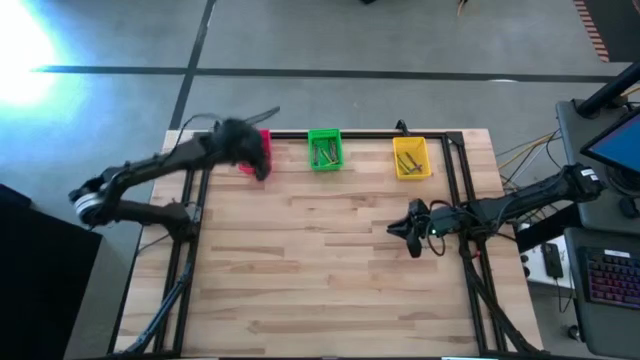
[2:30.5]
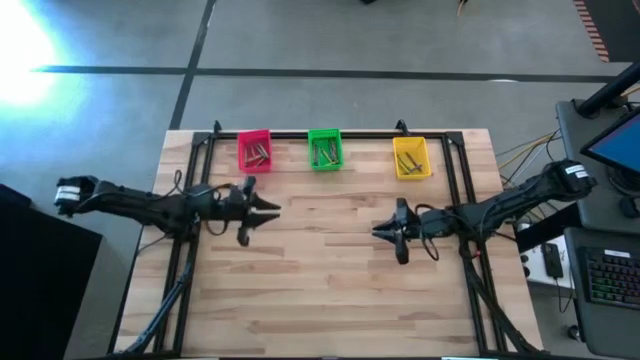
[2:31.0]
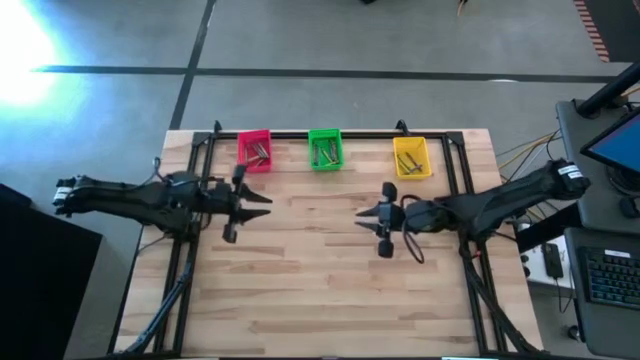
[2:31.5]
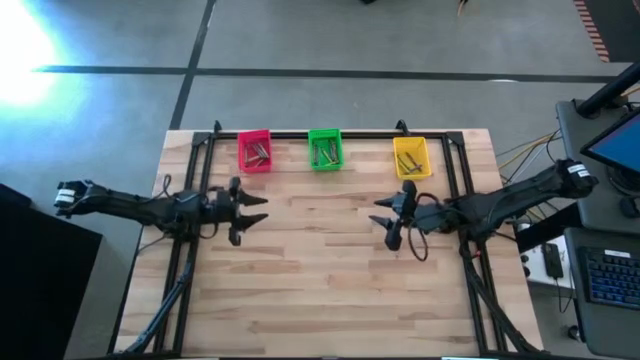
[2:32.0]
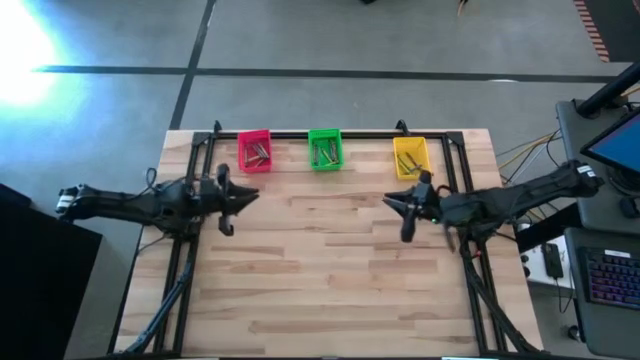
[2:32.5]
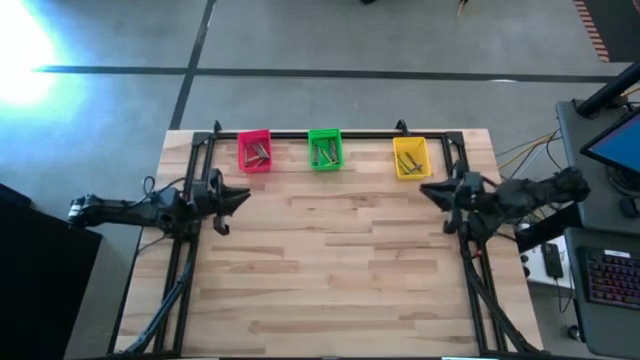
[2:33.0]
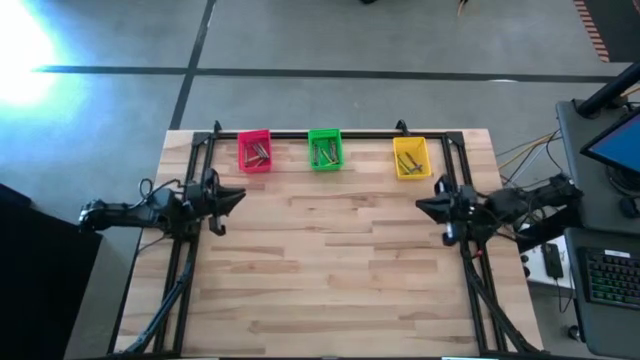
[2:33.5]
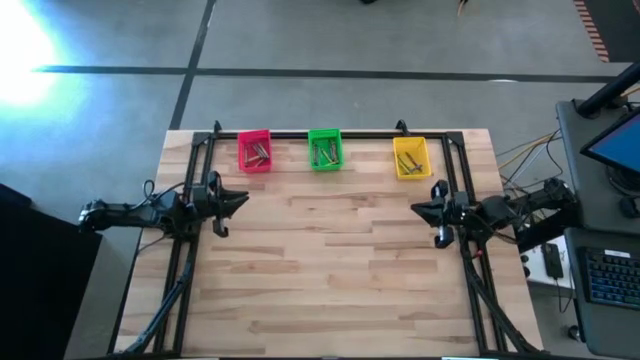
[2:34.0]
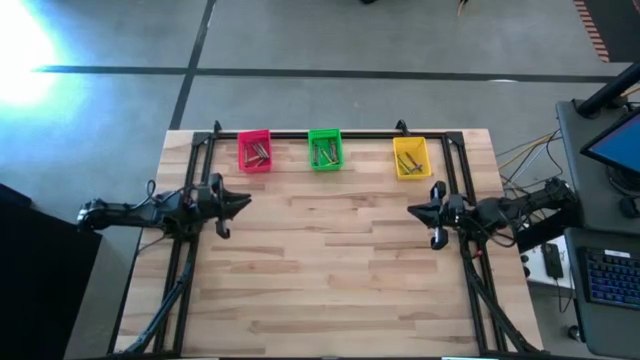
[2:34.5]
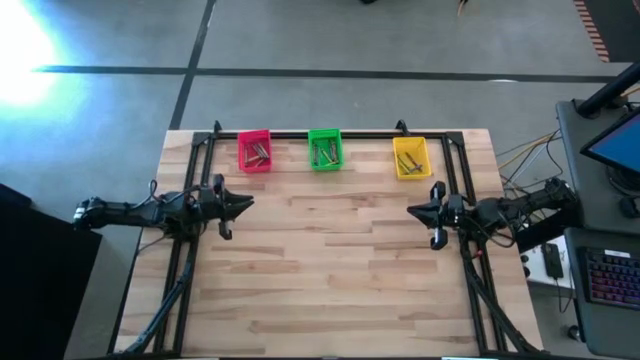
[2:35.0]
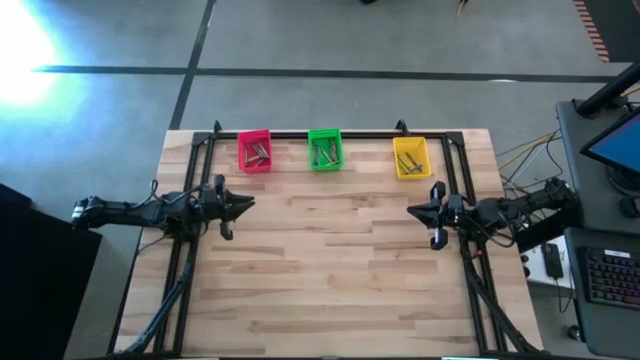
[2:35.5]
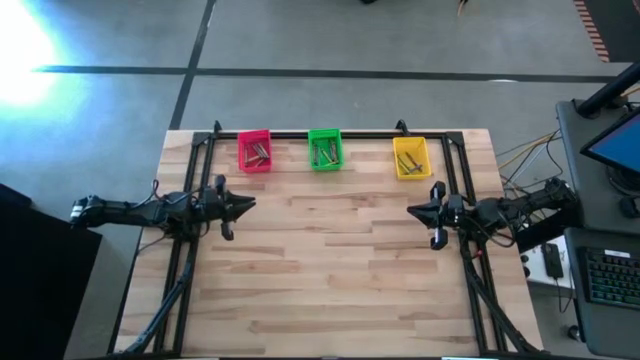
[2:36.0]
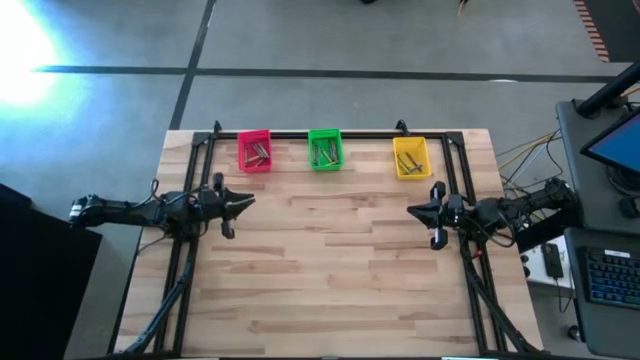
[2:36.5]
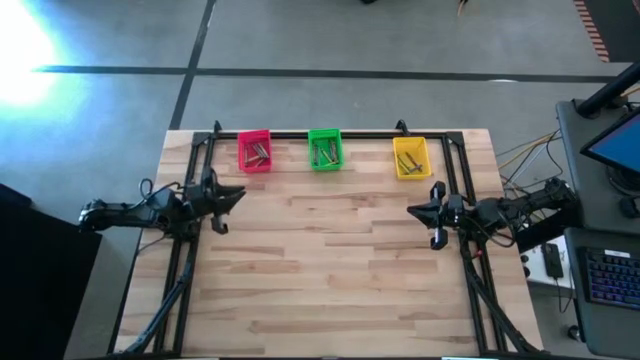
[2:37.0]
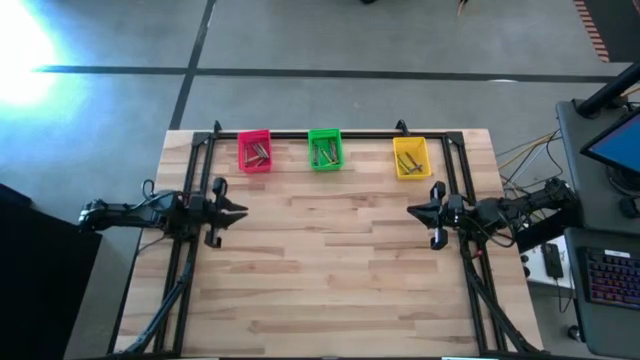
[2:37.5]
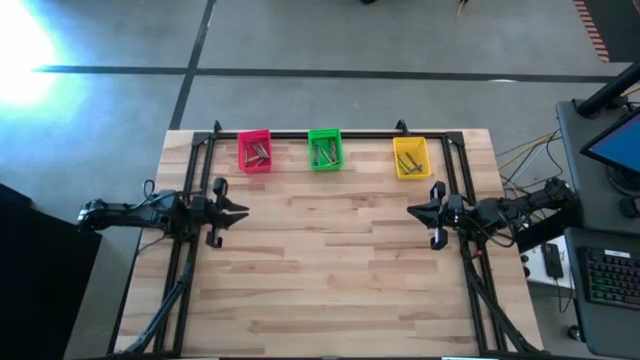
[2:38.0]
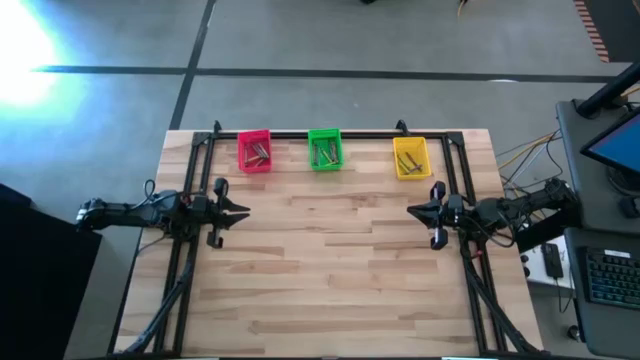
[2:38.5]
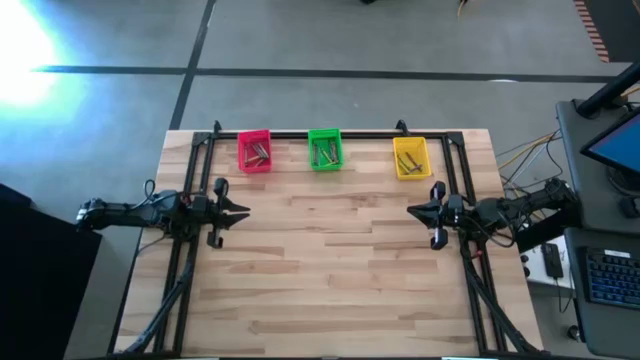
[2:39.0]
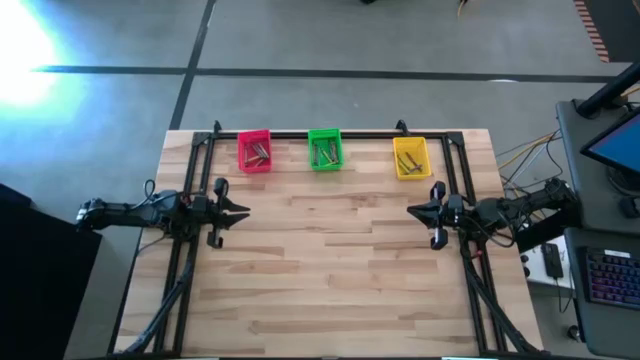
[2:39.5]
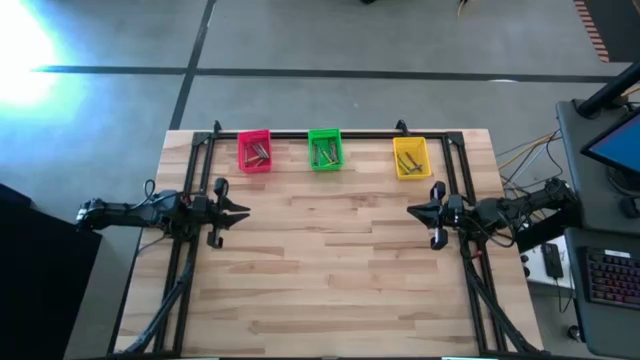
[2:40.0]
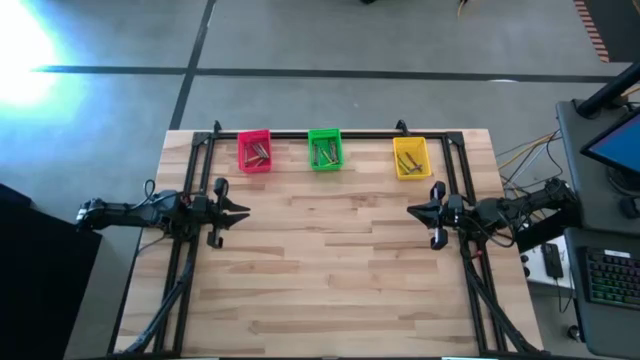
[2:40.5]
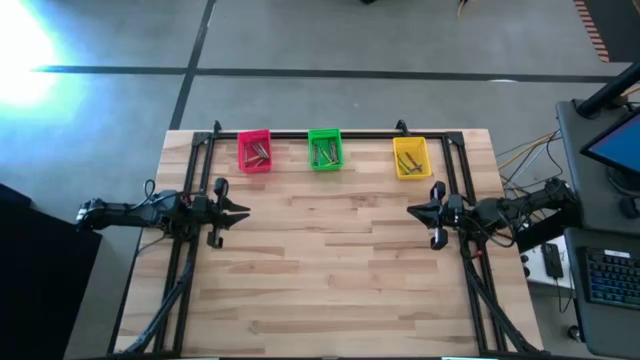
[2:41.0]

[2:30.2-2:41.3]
Task: Sort crayons
Return to Home Position

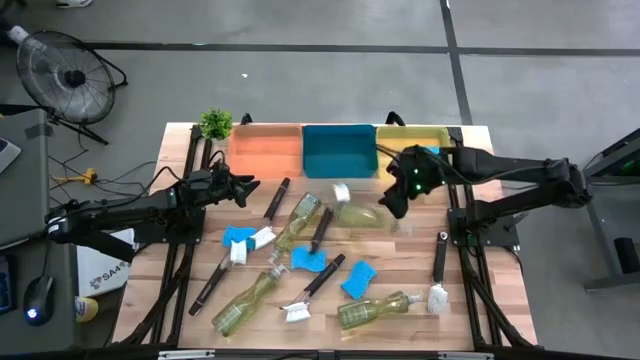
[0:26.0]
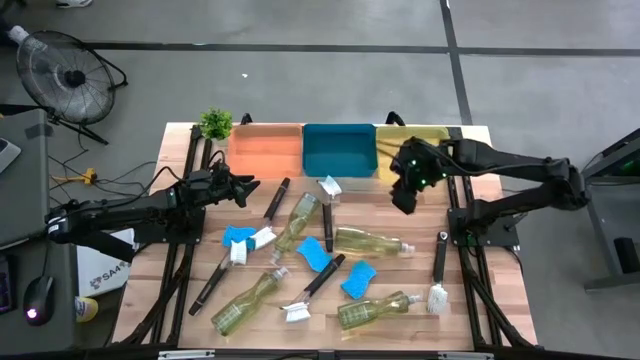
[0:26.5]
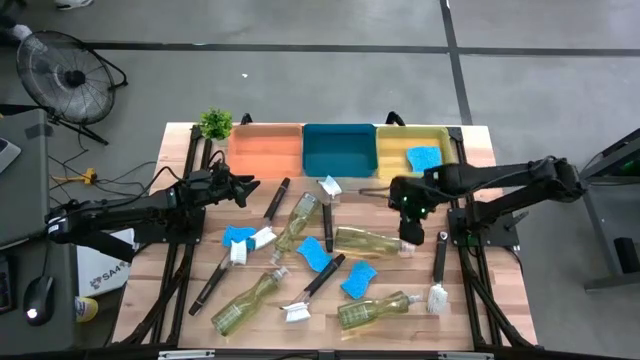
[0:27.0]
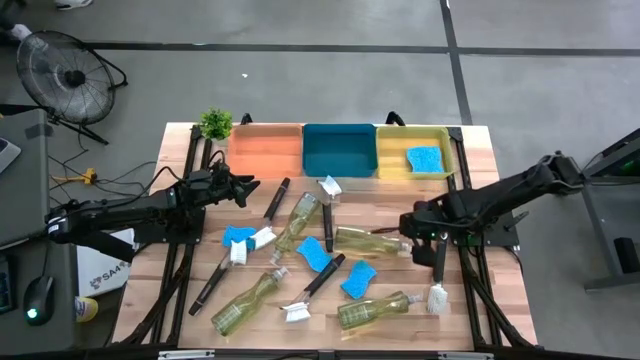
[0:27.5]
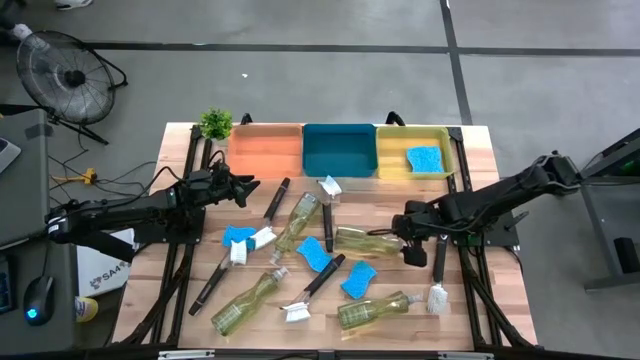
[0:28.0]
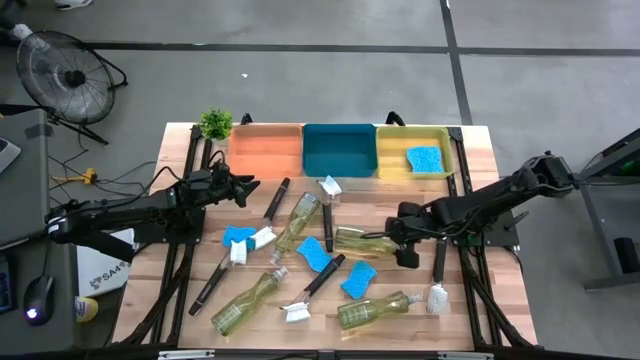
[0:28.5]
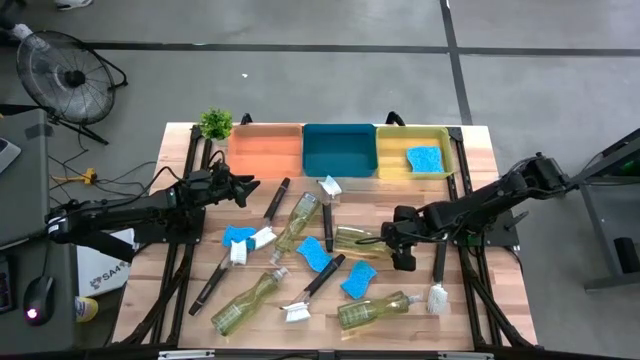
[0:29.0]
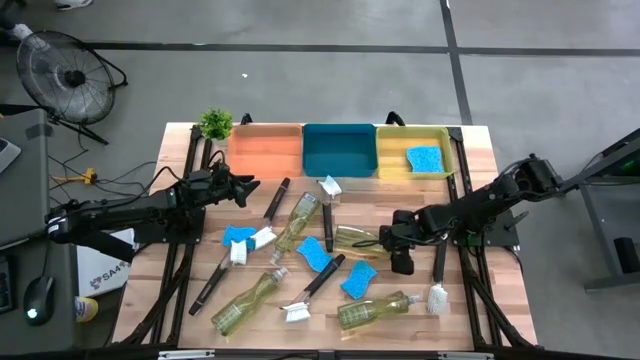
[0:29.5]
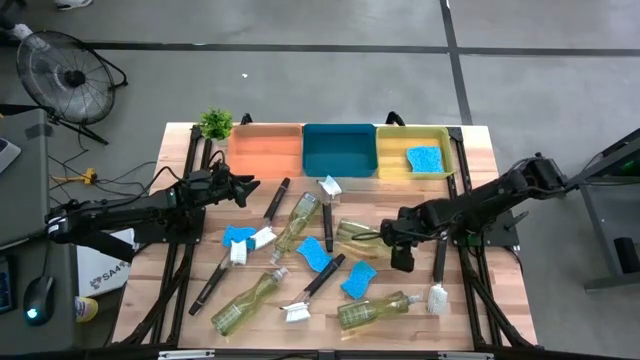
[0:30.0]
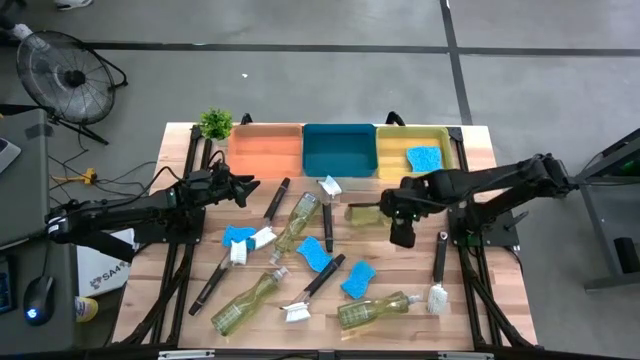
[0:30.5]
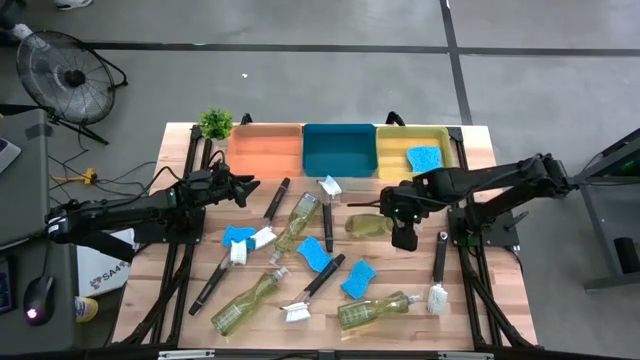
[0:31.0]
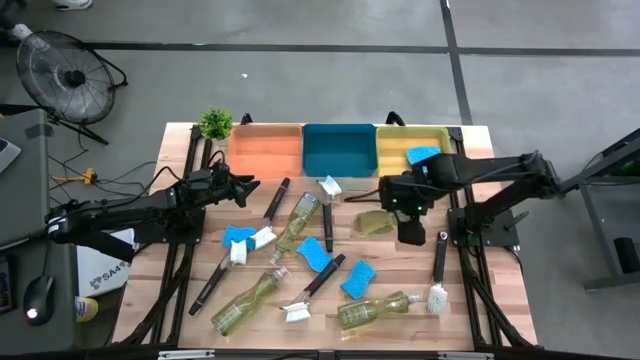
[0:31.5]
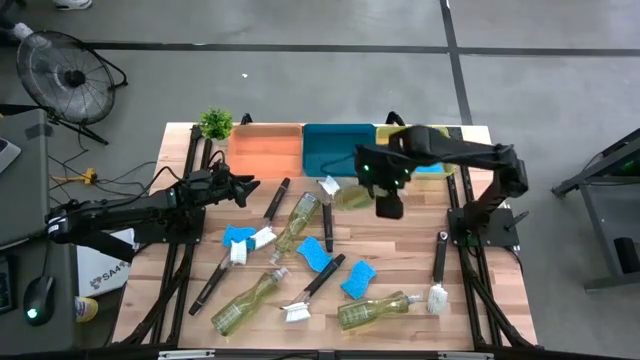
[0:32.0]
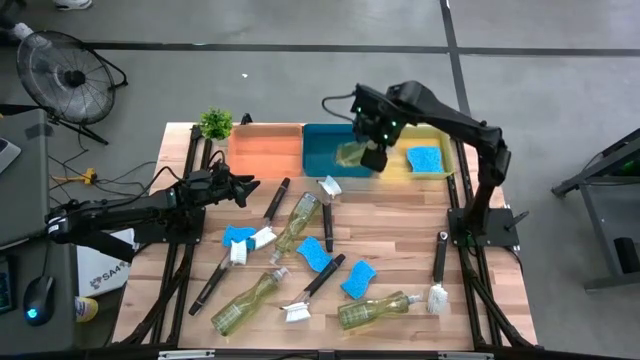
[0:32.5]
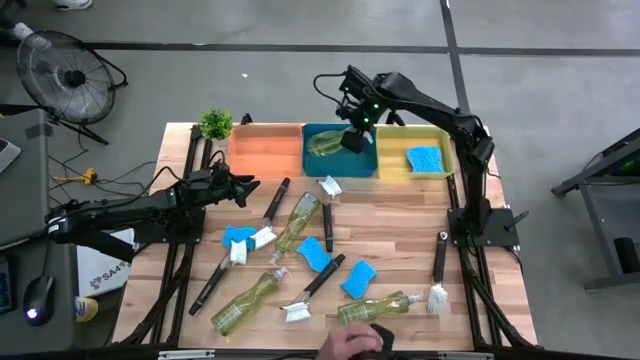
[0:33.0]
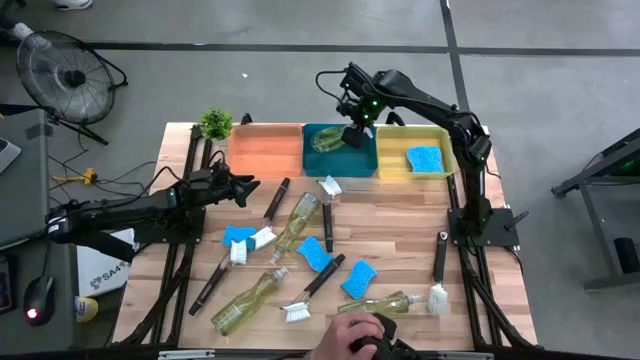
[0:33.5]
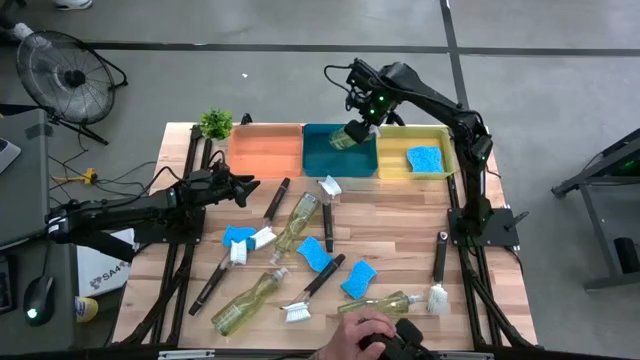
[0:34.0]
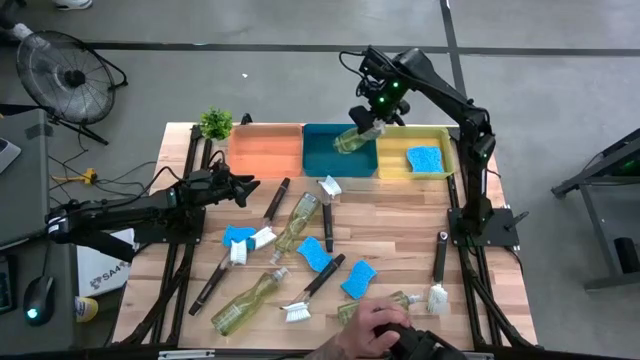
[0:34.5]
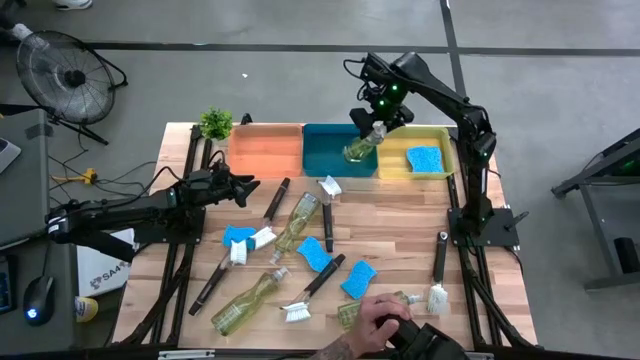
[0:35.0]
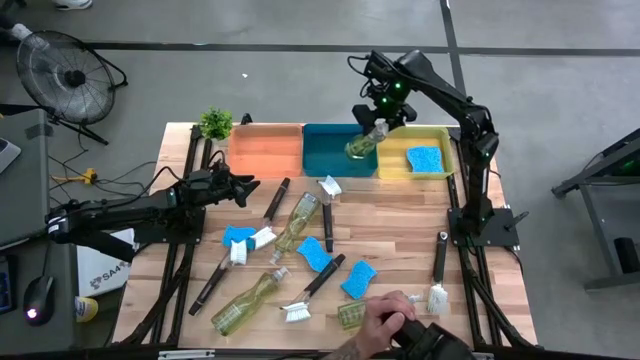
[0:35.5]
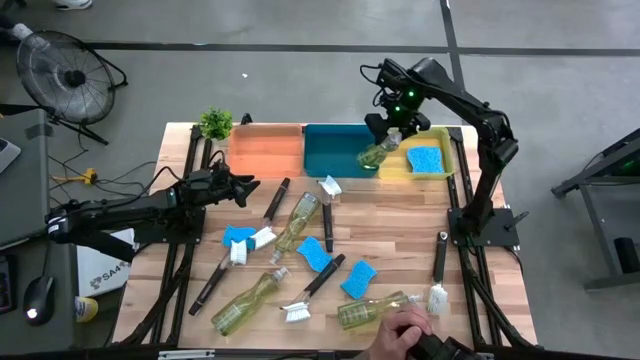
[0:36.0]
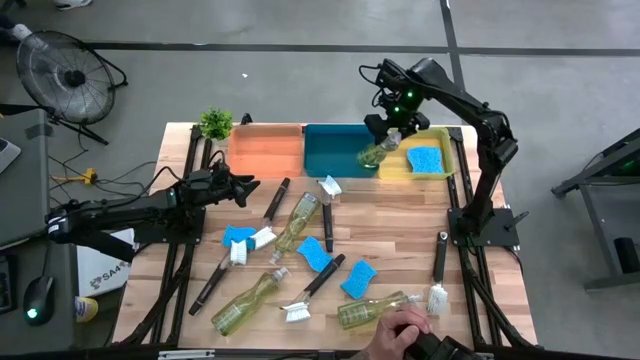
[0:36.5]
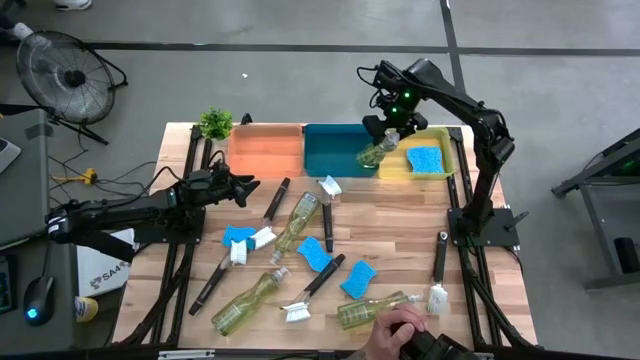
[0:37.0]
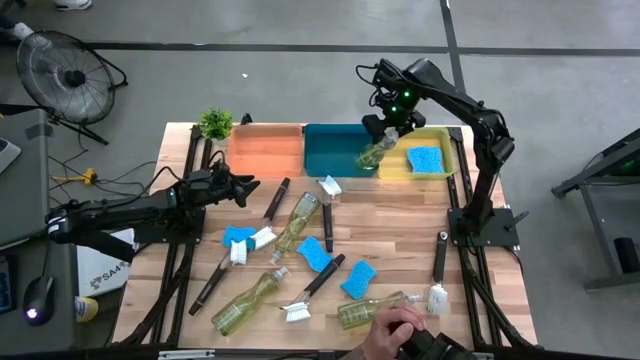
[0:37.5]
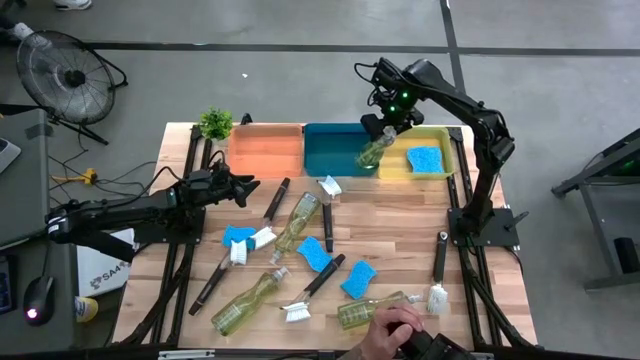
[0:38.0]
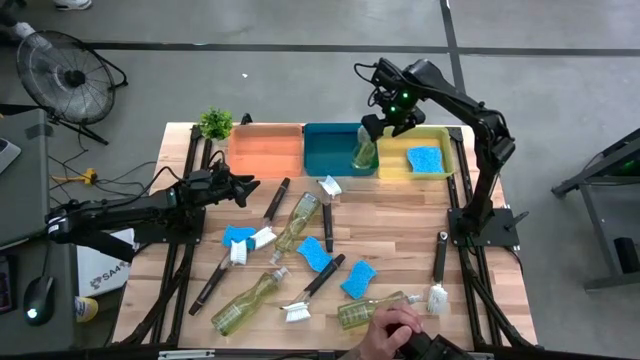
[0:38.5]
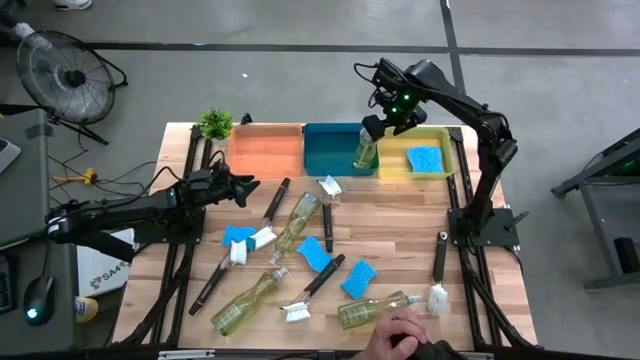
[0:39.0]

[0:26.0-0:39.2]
Task: Pick & Place Kitchen Sink Supplies
Put the green dishwashing liquid bottle into the blue bin
